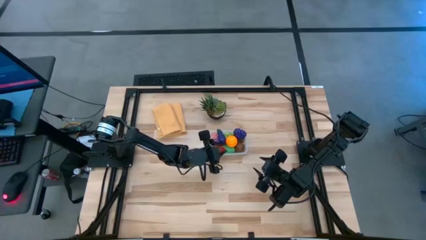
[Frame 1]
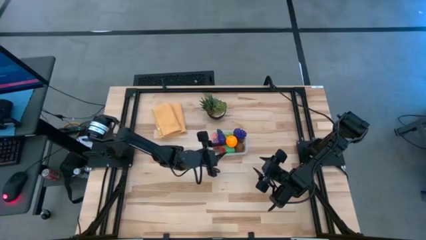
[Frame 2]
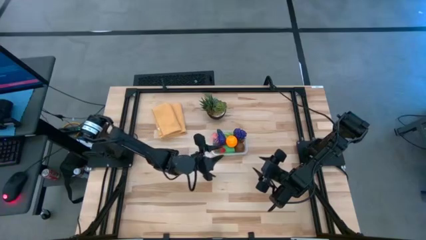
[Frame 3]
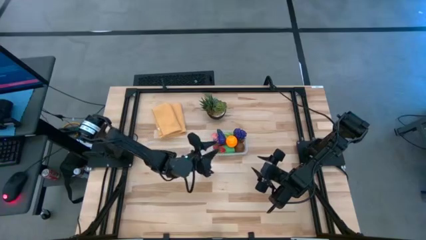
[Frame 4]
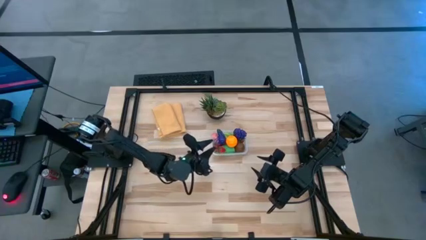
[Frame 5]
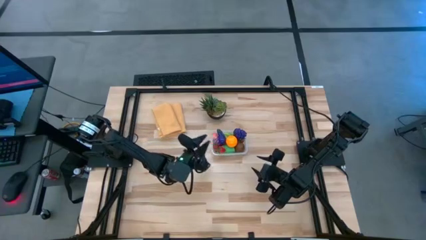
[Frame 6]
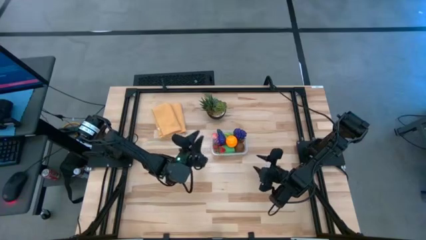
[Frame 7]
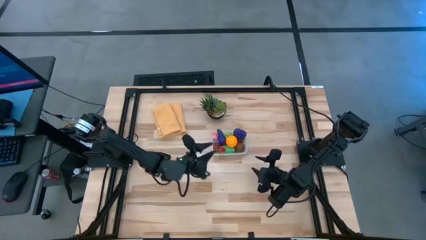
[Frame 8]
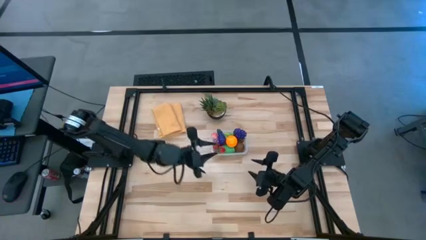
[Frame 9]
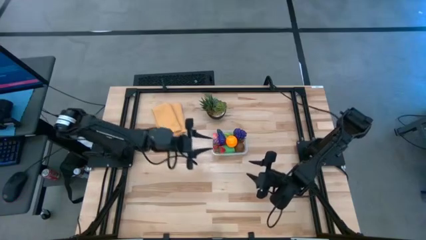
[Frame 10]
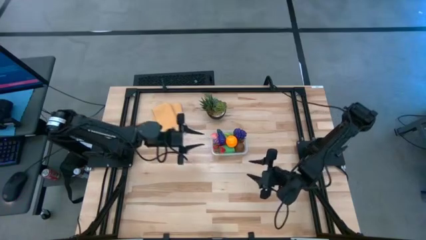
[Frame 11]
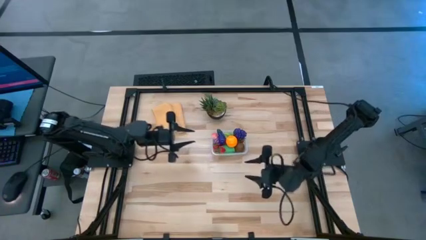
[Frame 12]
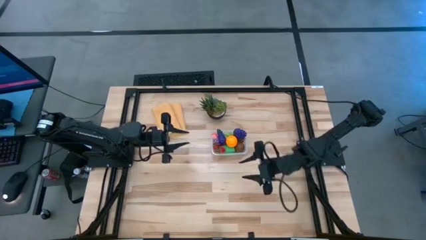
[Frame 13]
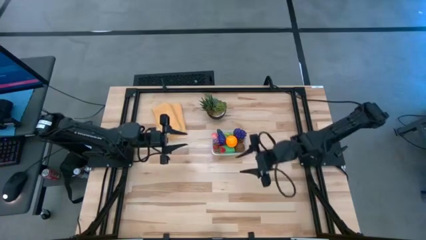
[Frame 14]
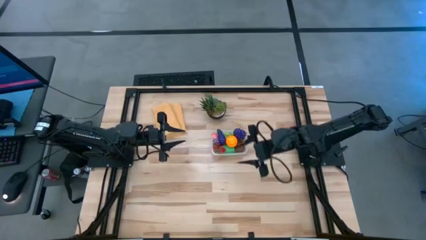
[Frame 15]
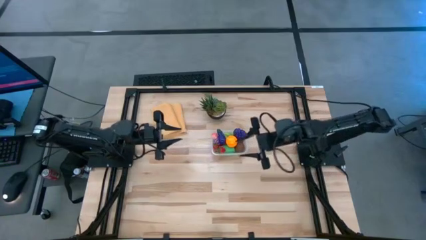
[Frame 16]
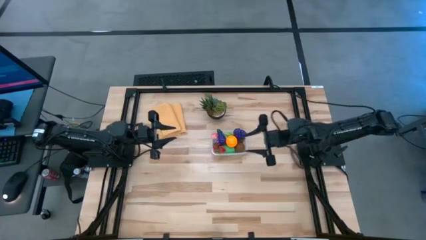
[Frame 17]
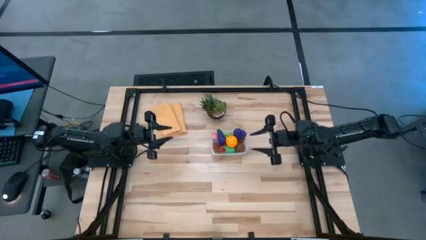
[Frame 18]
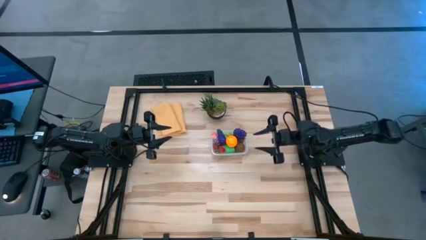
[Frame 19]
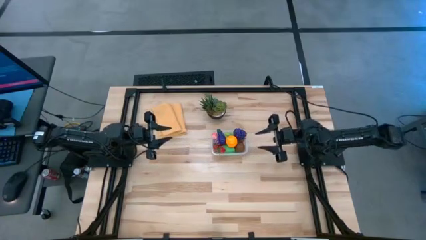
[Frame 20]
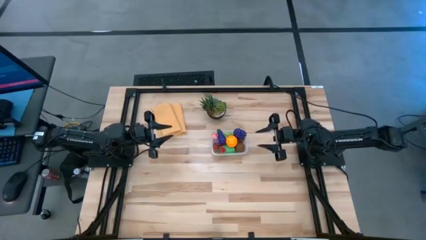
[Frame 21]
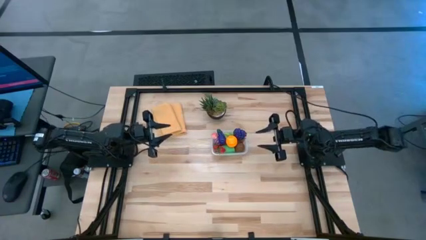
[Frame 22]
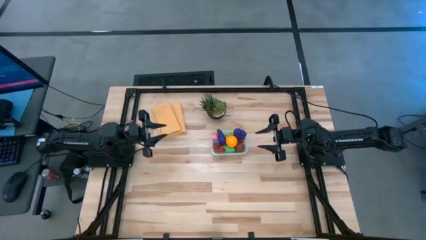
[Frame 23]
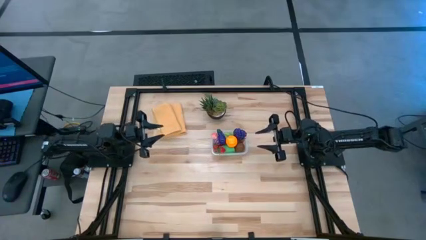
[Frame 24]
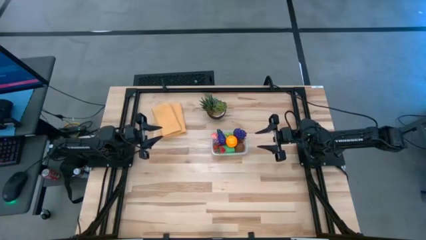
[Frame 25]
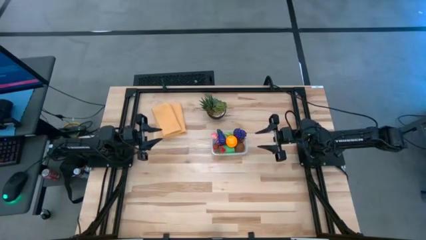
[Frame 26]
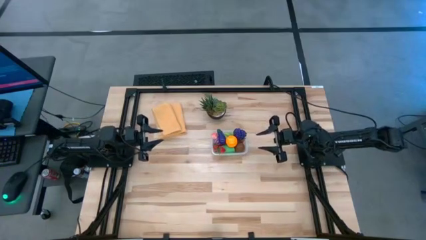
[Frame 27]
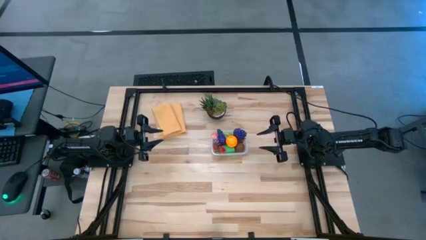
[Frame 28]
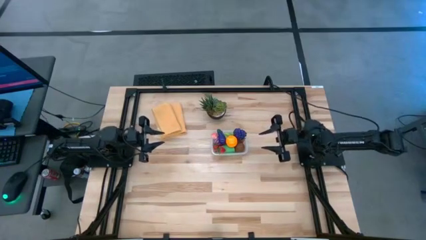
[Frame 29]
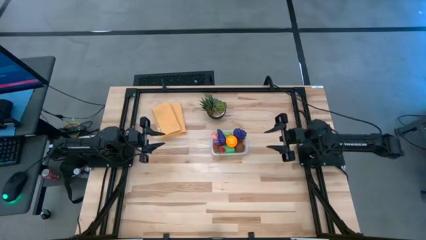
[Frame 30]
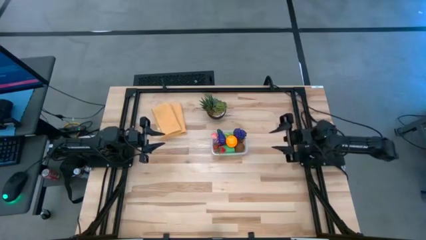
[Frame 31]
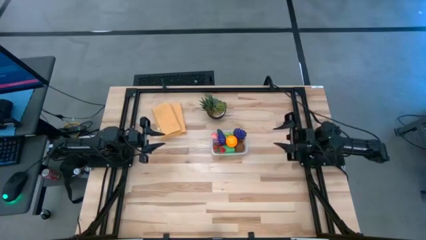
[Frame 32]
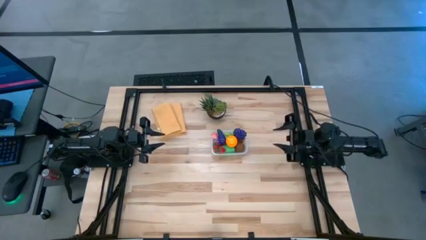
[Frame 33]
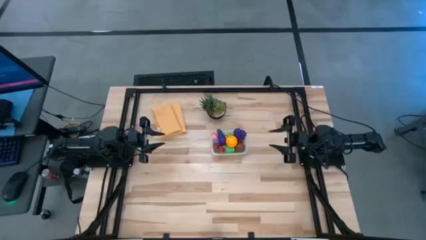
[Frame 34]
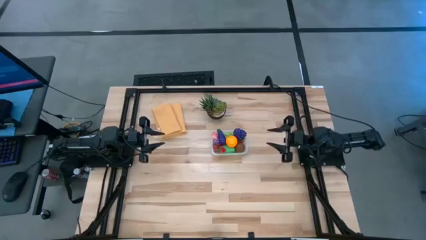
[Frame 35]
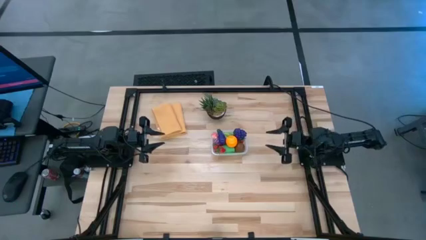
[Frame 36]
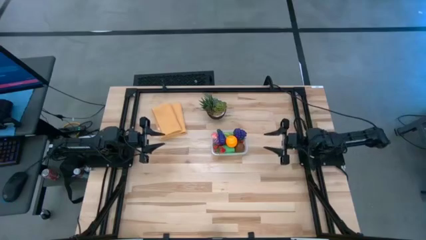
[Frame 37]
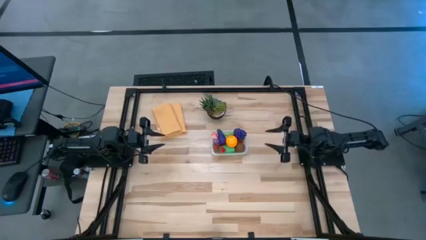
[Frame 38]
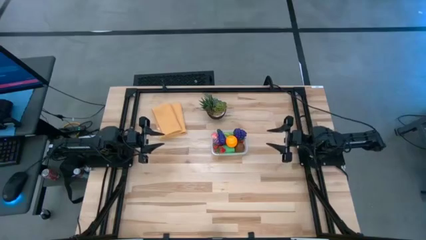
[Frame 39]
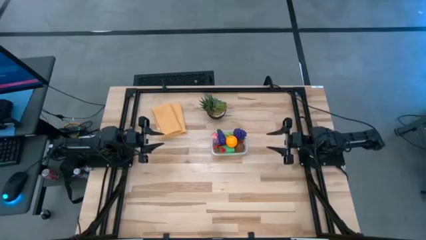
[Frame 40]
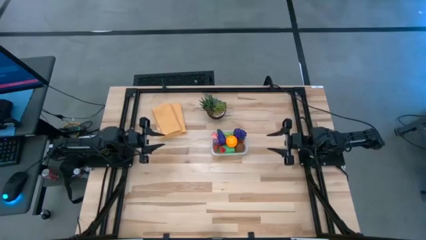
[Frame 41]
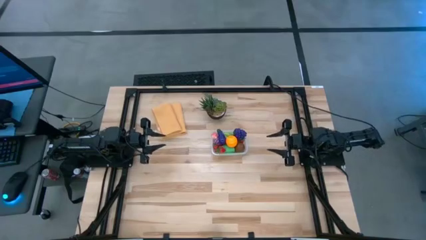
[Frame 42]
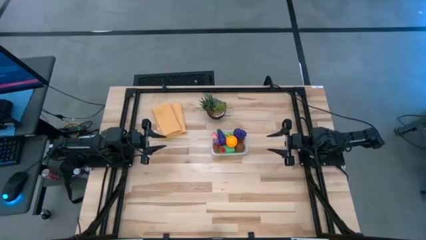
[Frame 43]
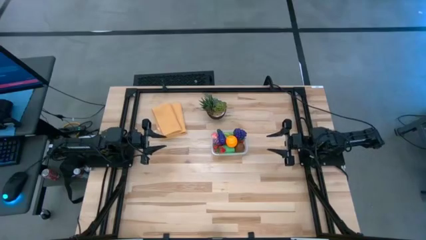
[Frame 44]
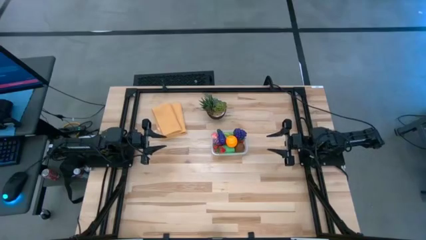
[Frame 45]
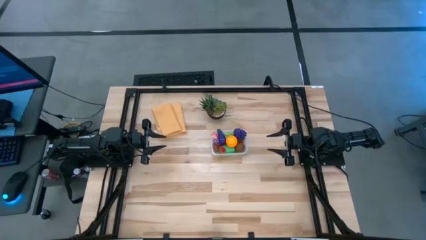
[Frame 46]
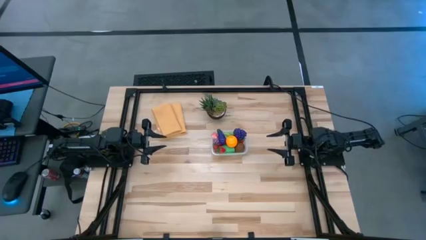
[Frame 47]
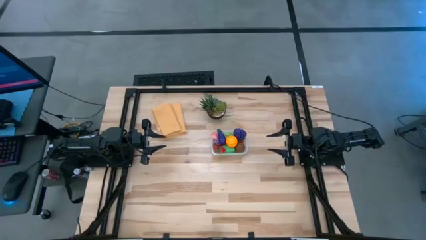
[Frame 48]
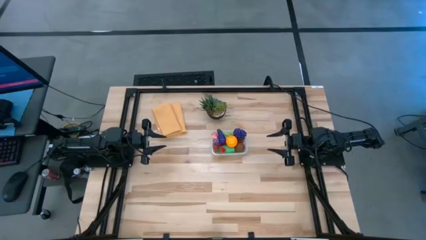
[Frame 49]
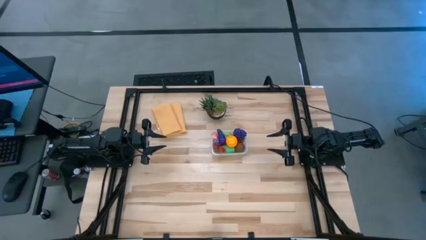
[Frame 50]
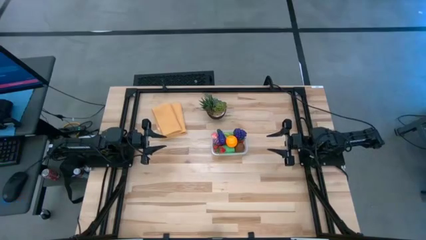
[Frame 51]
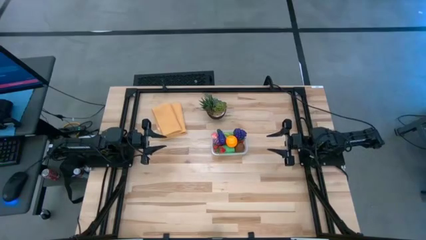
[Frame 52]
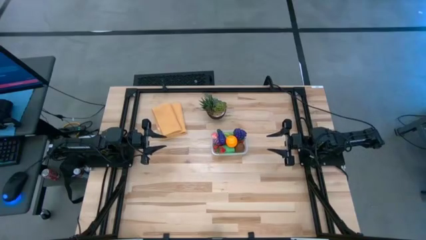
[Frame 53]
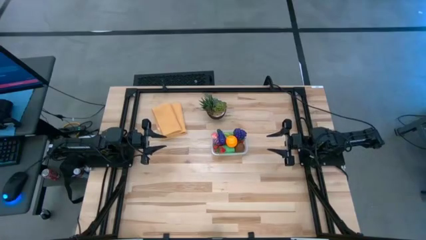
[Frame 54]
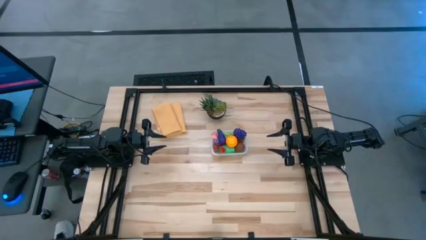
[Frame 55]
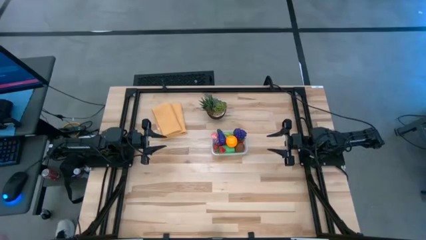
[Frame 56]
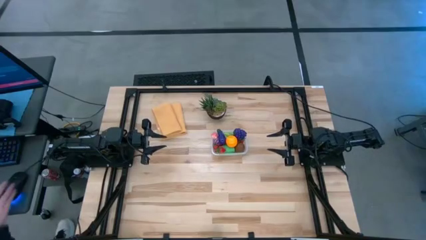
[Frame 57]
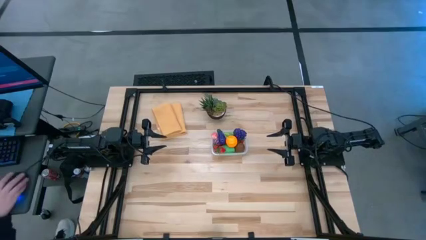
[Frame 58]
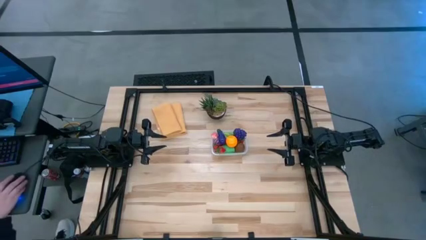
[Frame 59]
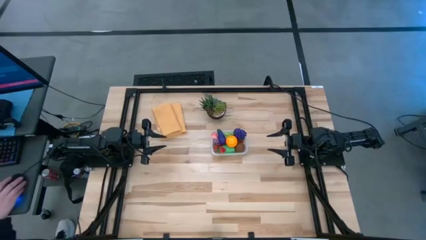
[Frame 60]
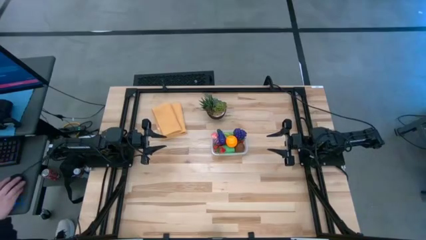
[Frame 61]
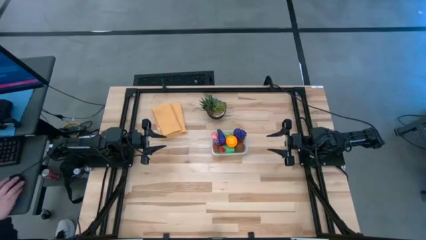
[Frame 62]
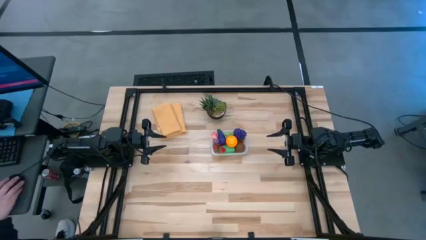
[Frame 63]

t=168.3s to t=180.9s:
Task: Pick and placing Produce into tupperware
Return to Home Position

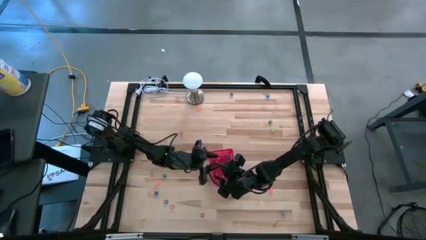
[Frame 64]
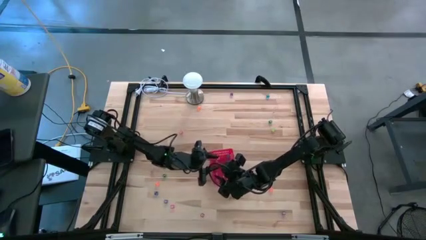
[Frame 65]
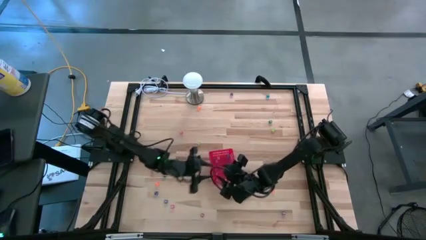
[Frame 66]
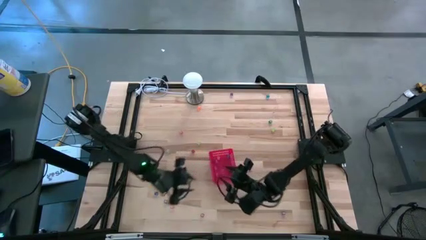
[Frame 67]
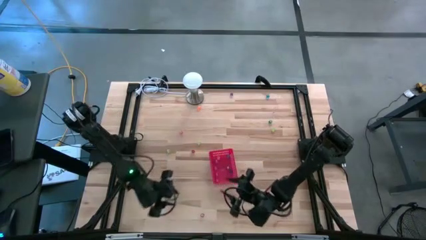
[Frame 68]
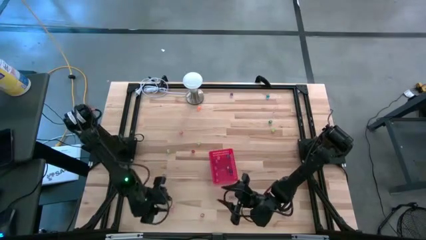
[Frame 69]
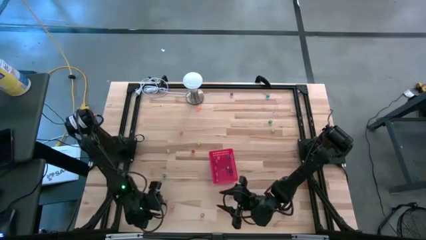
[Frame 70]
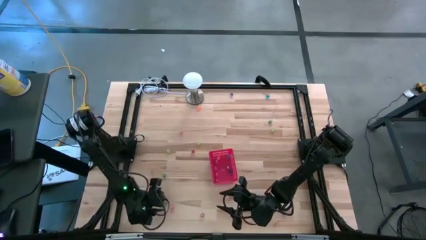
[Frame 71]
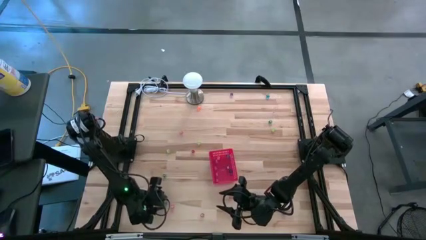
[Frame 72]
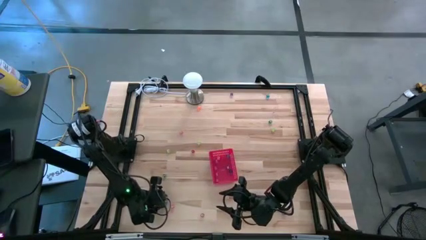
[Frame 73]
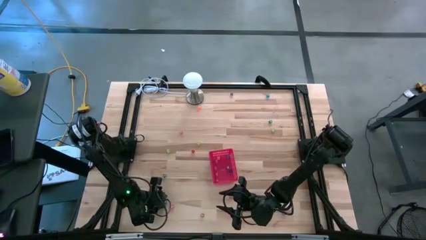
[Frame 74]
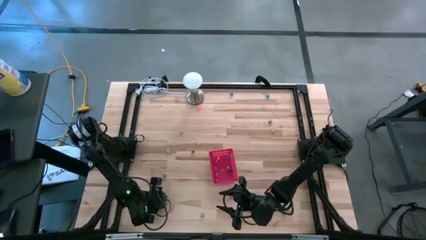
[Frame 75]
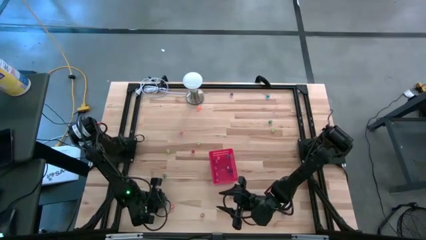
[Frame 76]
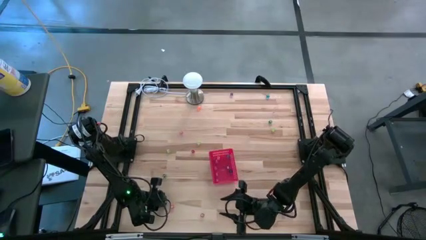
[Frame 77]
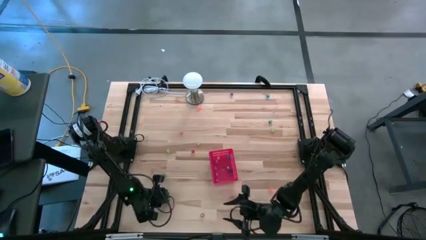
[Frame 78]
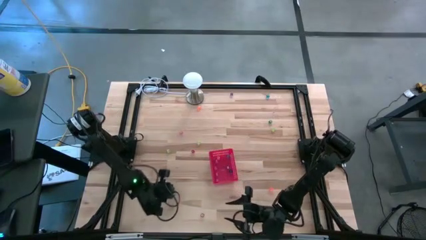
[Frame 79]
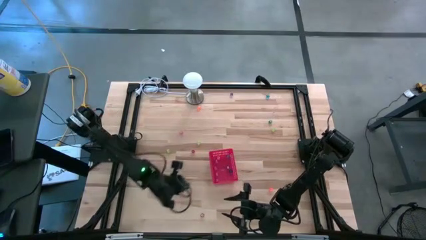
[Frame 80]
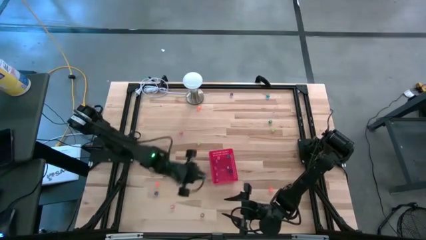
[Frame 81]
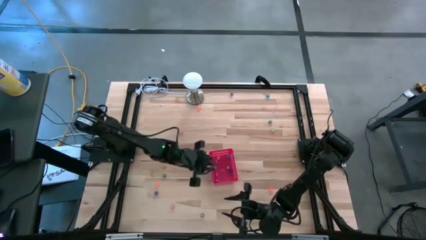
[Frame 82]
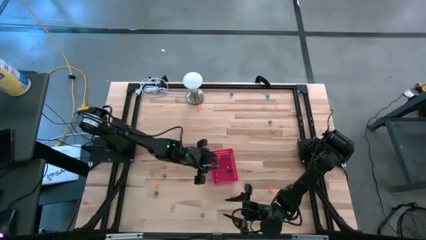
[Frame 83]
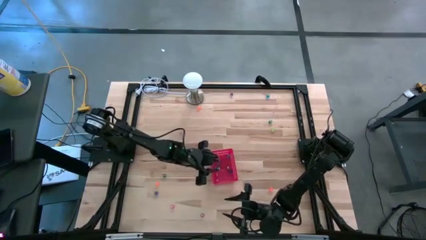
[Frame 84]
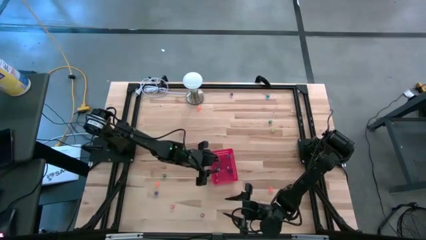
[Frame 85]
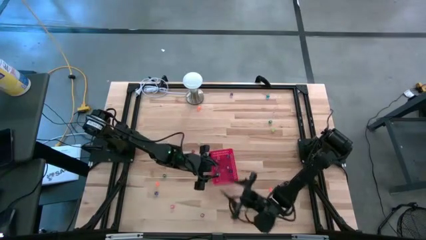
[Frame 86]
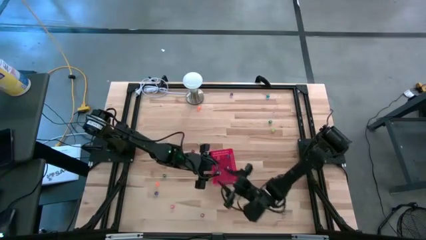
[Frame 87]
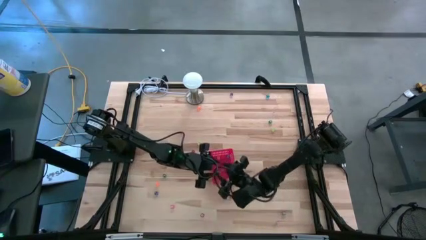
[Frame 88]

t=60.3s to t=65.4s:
Task: Pick & Place Dice
Put the dark blue die into the red basket
